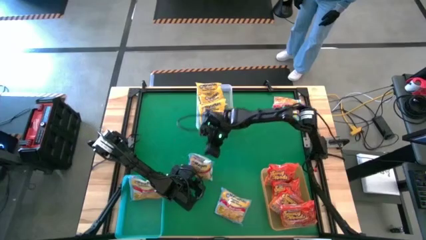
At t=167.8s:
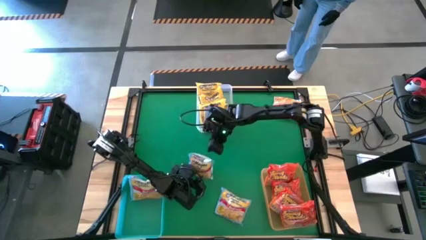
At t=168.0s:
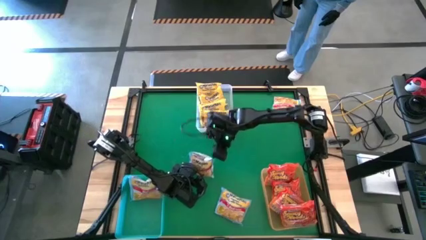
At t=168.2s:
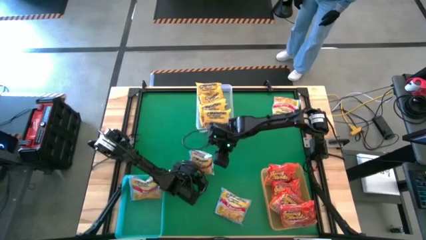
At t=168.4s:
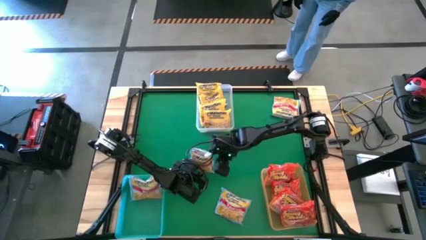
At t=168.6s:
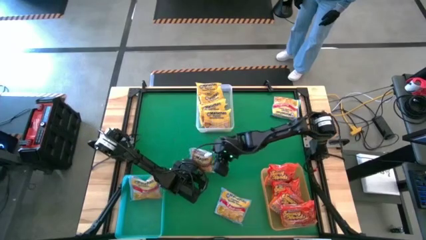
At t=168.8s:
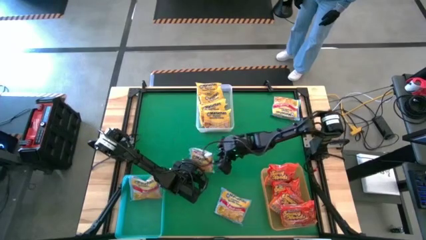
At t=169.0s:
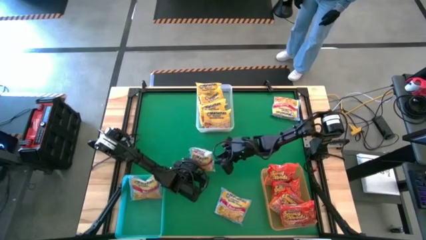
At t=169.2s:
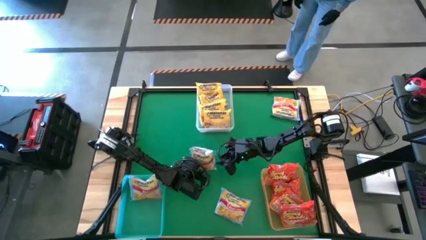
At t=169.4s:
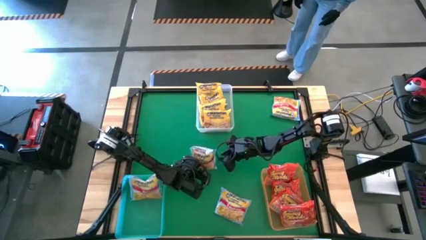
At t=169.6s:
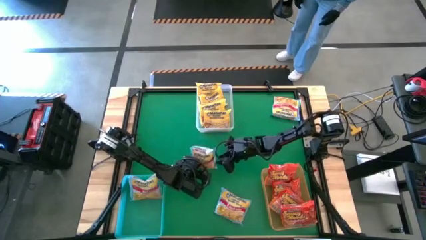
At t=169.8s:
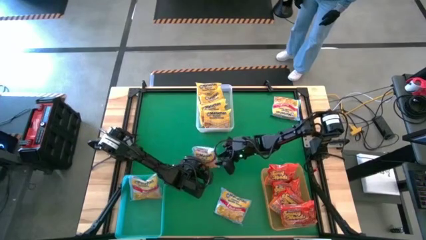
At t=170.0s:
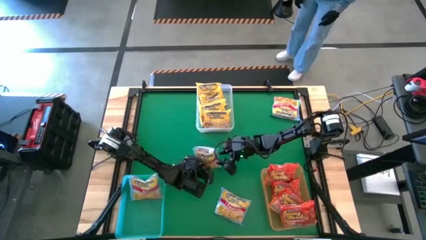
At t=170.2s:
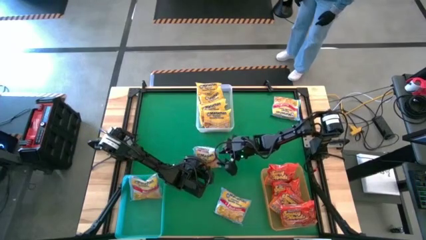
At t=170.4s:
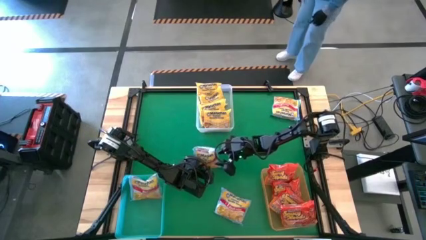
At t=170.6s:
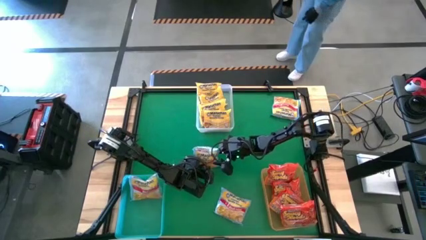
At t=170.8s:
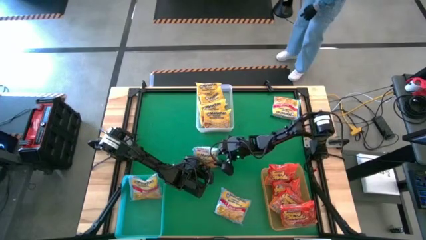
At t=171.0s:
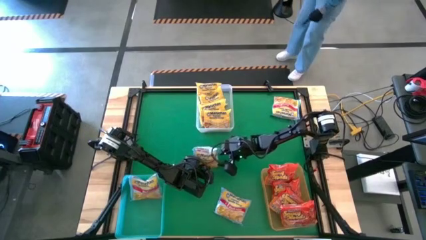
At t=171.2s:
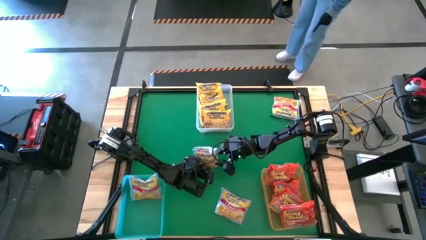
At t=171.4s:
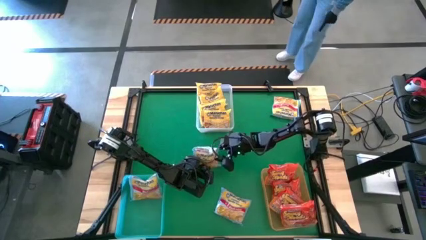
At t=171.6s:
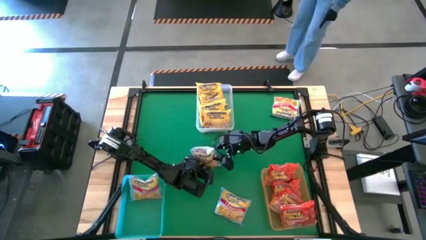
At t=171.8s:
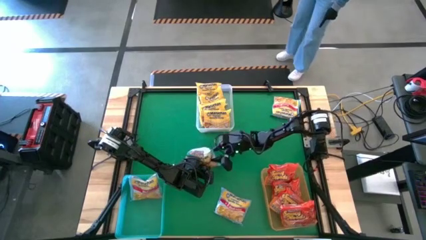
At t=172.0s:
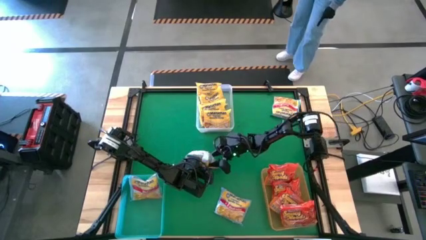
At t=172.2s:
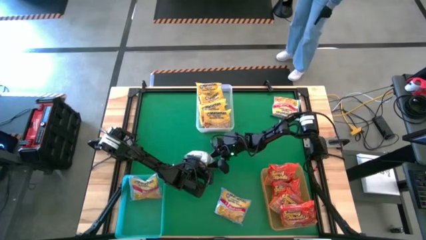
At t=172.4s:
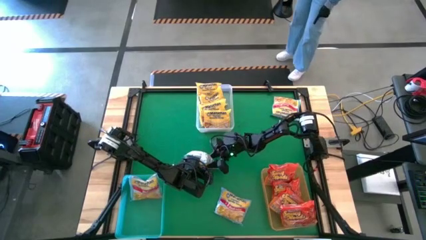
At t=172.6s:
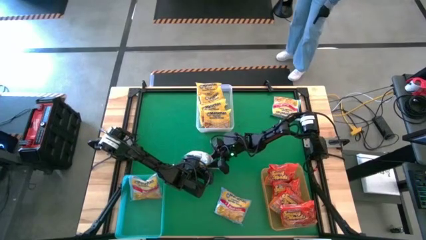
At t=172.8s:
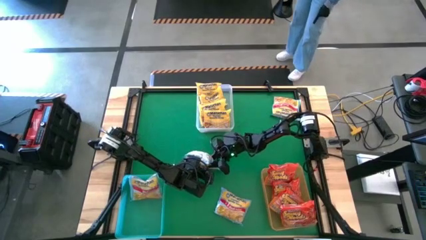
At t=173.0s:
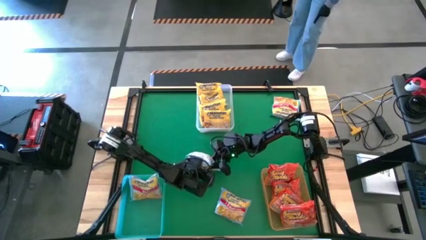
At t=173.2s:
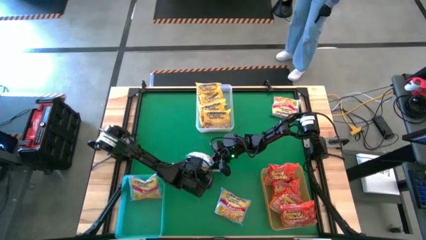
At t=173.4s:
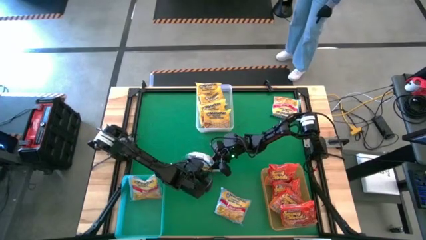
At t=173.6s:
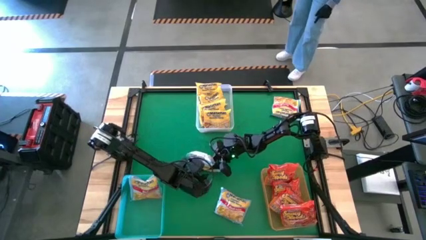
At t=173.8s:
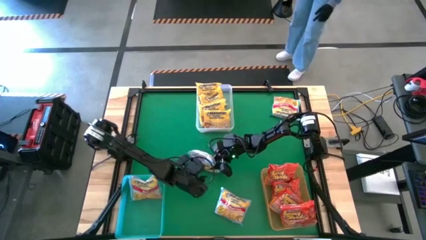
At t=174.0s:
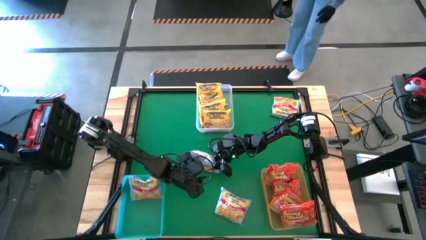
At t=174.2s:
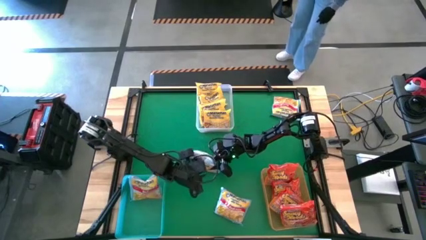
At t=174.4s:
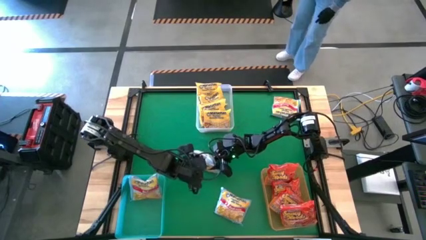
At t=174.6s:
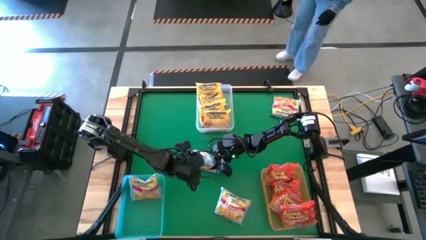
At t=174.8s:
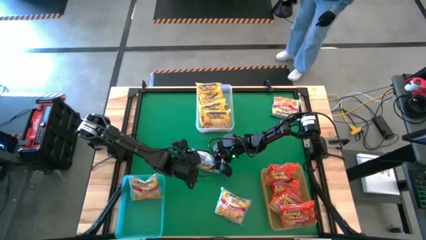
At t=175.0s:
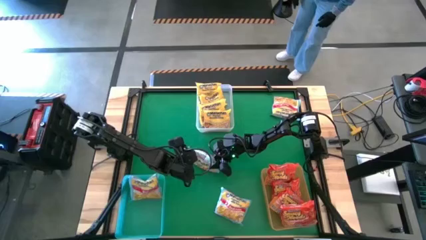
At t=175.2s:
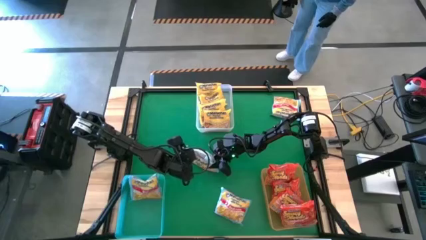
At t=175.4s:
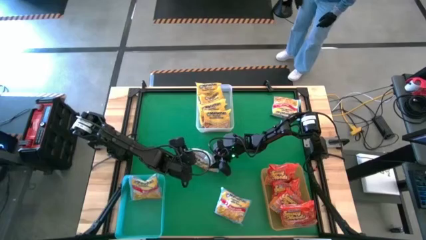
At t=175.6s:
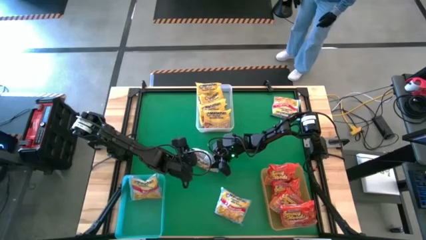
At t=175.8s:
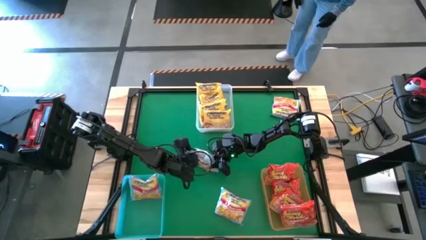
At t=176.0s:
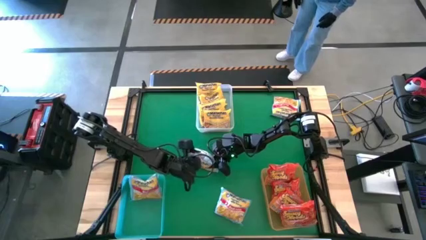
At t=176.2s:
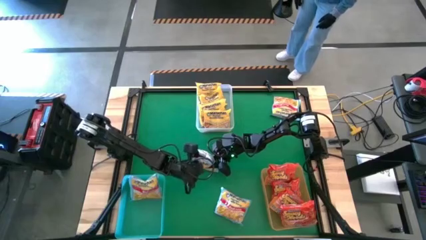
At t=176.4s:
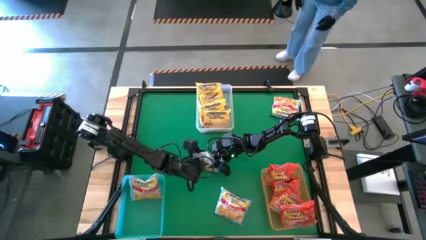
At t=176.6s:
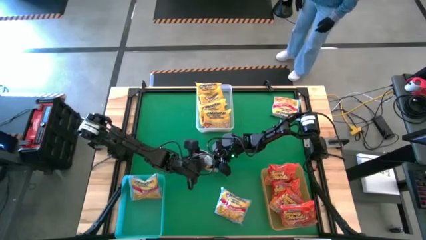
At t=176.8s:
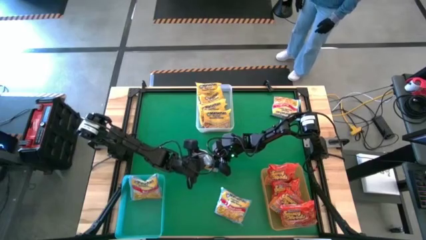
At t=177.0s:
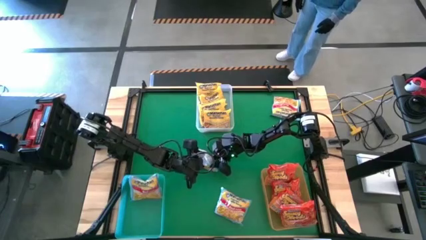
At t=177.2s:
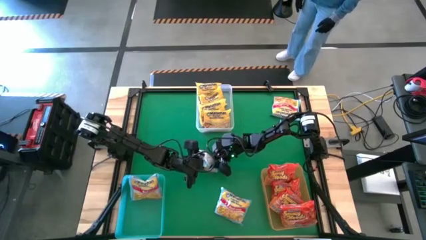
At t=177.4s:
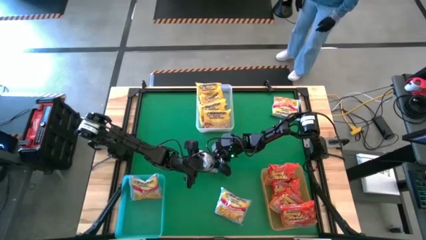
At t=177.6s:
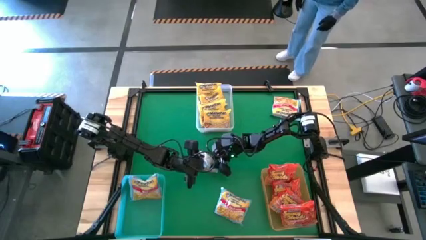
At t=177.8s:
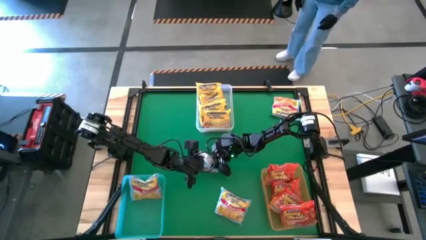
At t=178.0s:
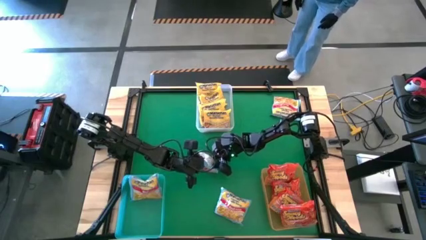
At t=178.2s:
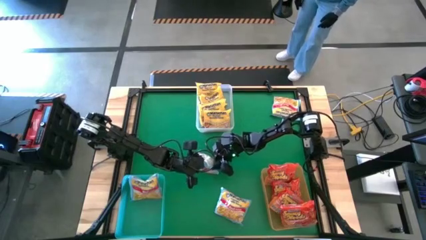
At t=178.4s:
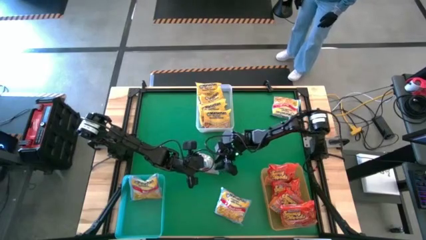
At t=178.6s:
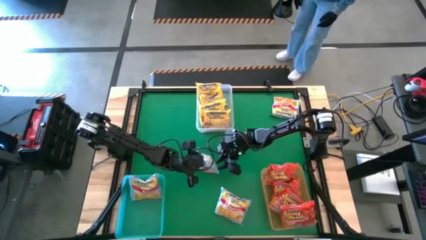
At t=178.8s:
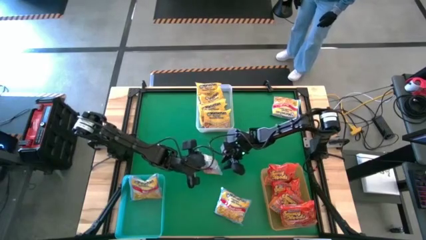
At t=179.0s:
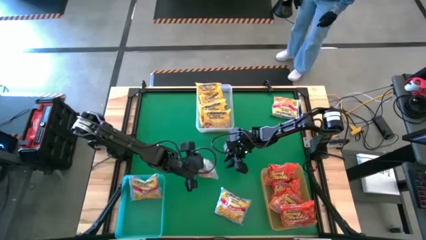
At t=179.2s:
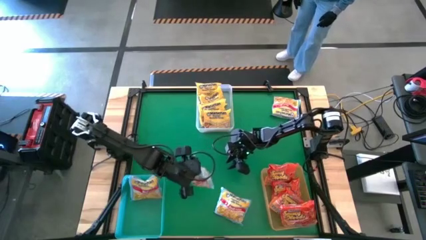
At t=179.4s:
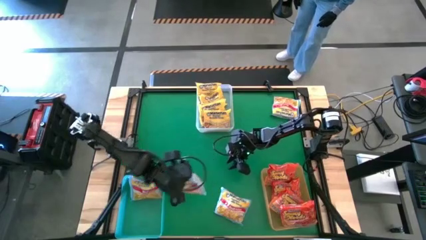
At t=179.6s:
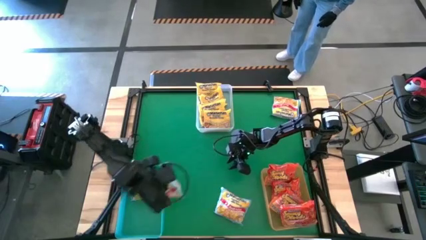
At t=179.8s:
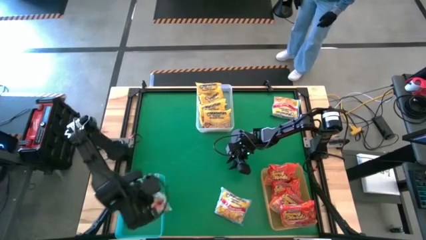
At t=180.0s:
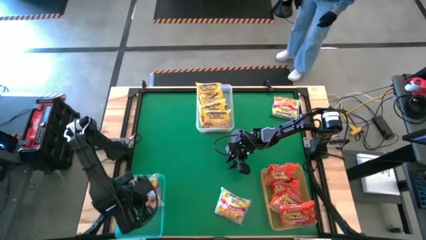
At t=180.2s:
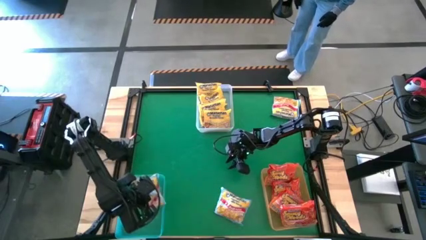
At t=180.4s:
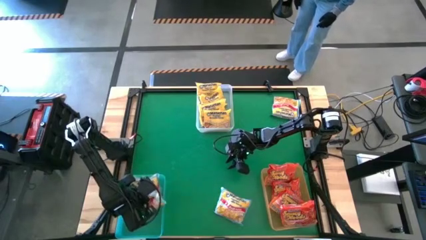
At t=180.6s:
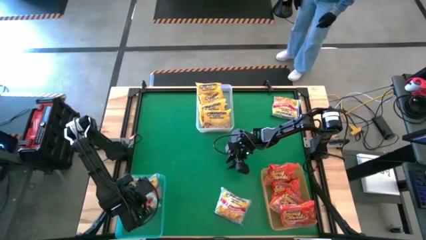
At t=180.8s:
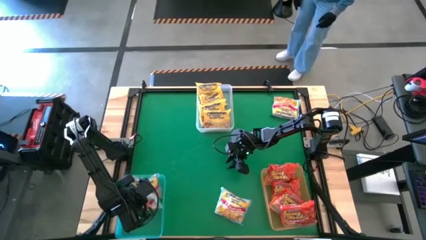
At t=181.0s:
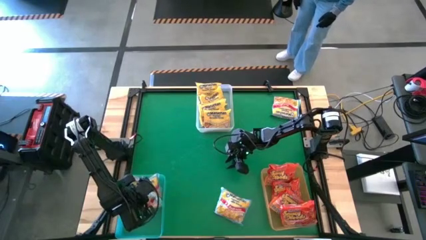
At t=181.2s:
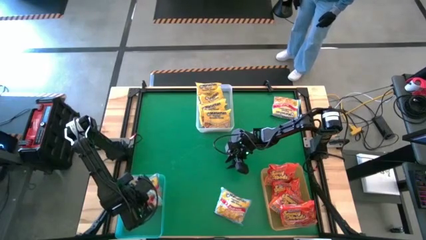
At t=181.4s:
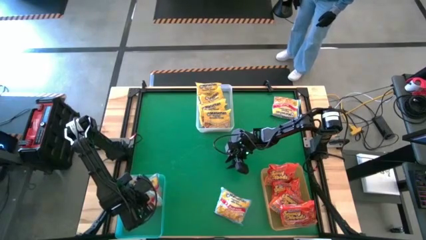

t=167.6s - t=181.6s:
Task: Sort Maruchan noodles
Put the middle blue noodle pack into the blue bin

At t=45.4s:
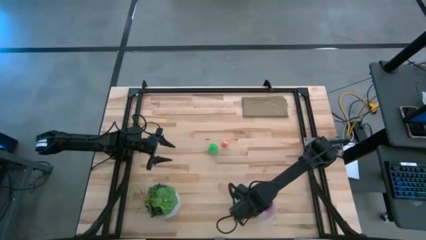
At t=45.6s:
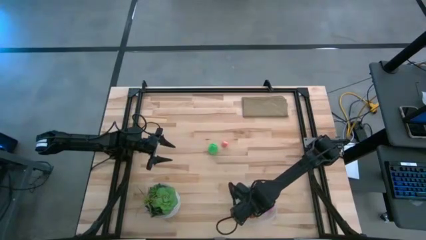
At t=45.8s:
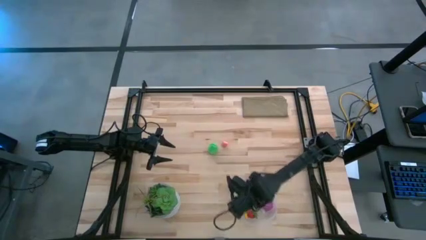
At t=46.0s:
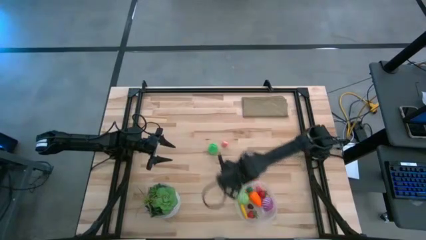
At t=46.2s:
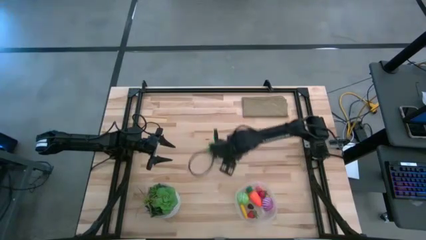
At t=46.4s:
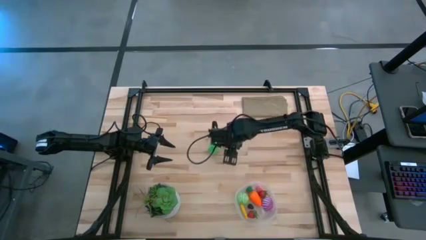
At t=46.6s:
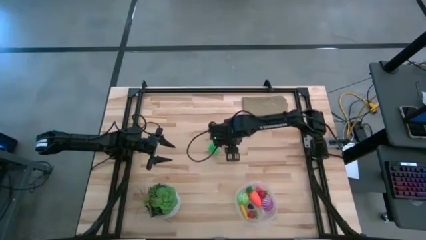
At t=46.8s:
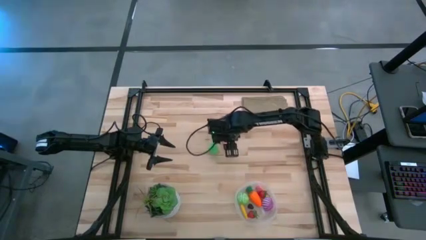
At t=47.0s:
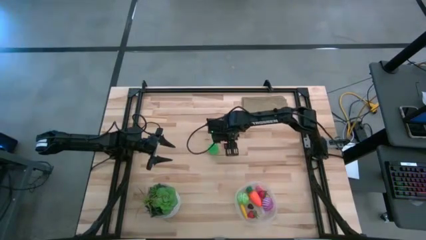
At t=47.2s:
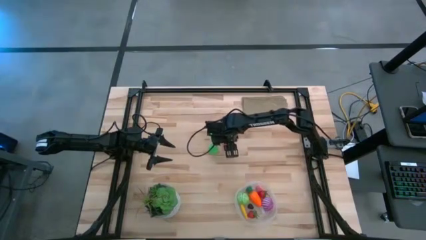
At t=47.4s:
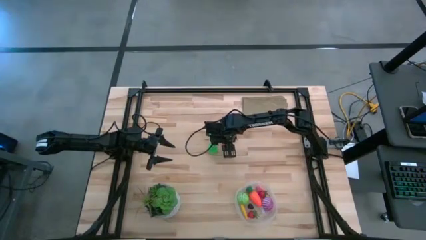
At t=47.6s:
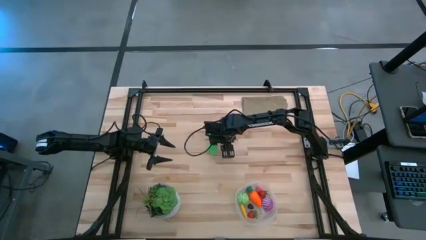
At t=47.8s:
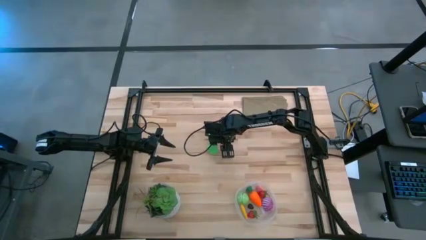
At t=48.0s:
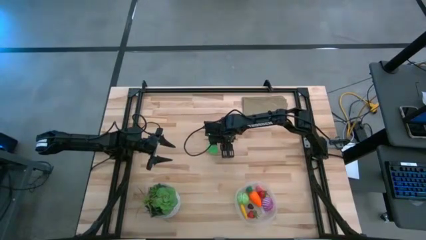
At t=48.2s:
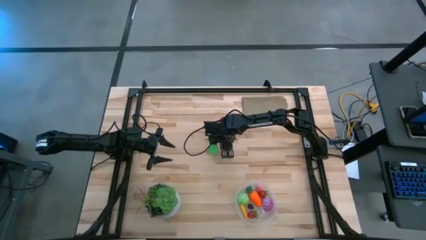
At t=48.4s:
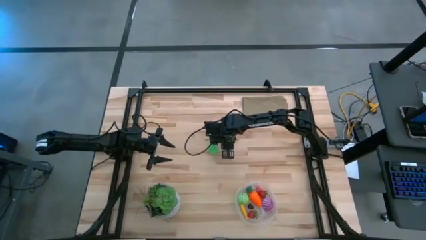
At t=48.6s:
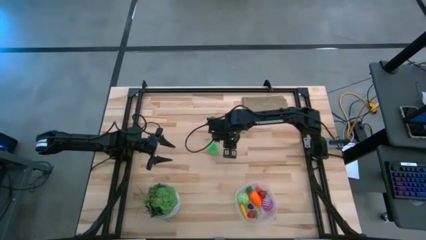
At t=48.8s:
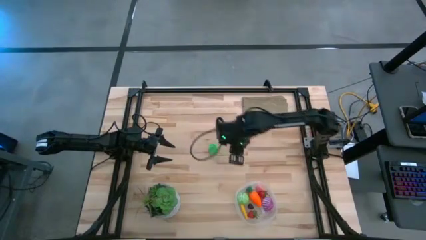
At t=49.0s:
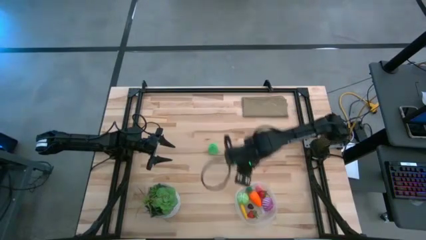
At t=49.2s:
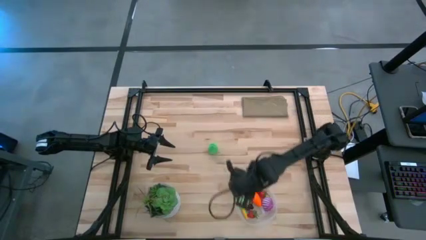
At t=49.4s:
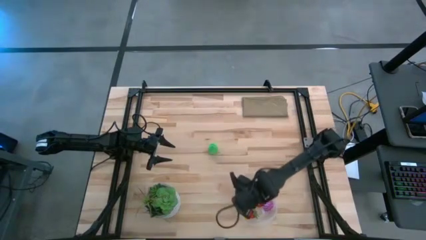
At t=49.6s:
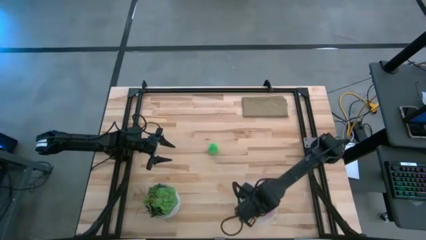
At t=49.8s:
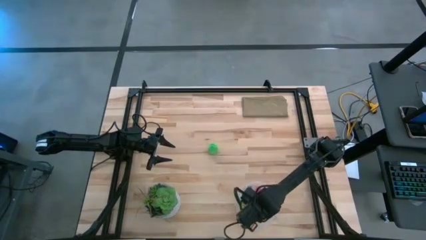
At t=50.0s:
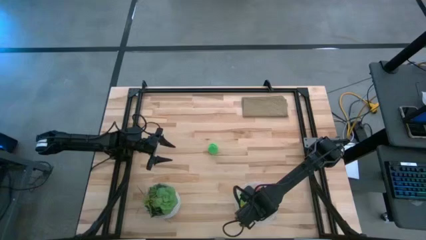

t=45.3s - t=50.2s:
Task: Pick and placing Produce into tupperware
Put the pink peach into the transparent container
